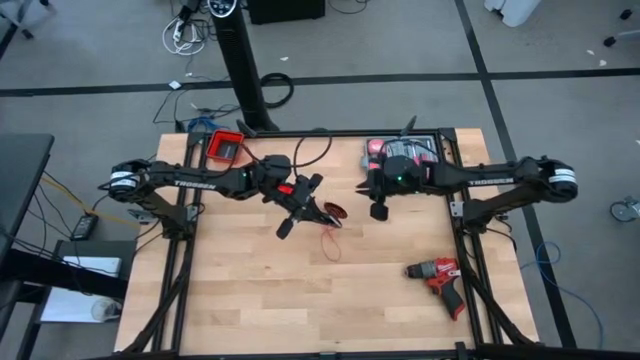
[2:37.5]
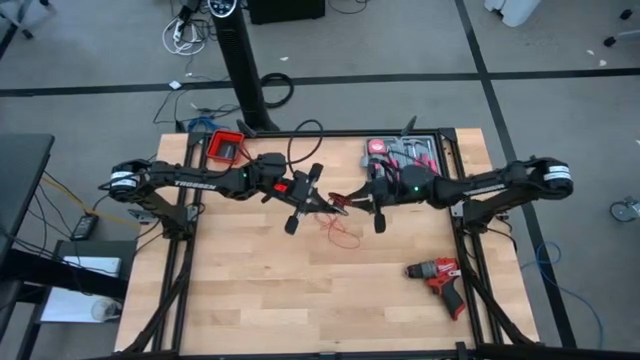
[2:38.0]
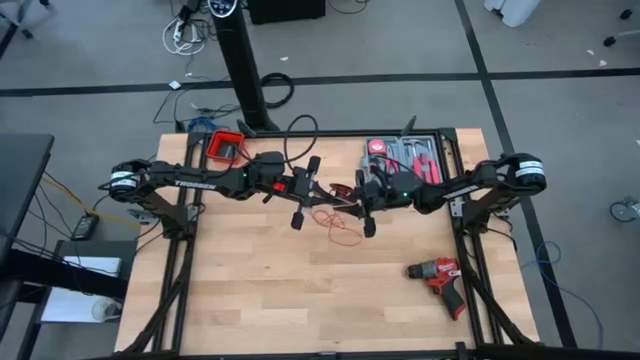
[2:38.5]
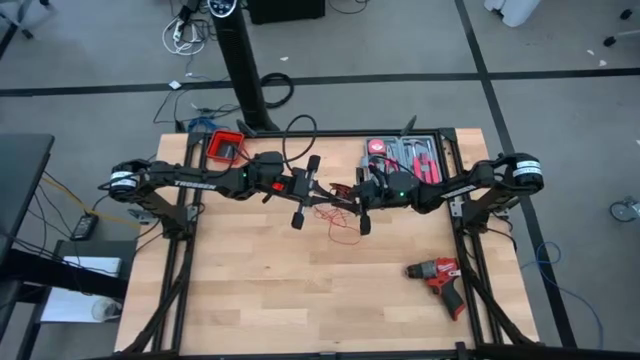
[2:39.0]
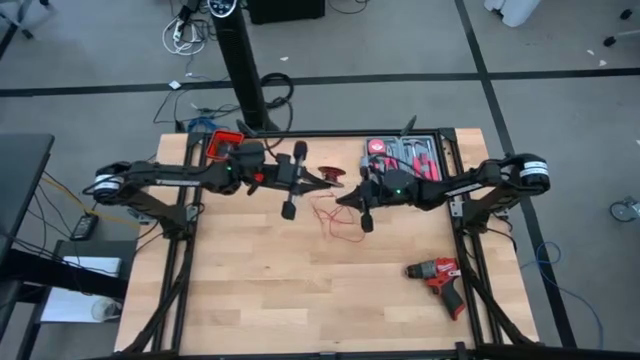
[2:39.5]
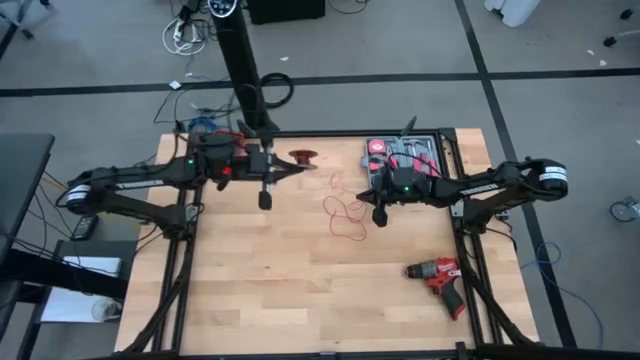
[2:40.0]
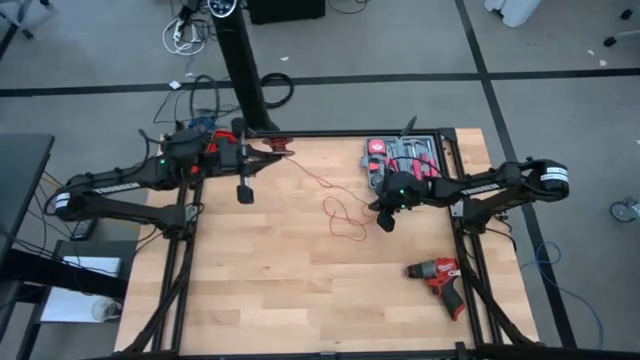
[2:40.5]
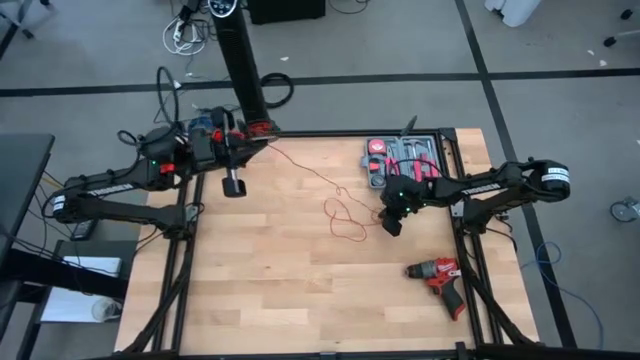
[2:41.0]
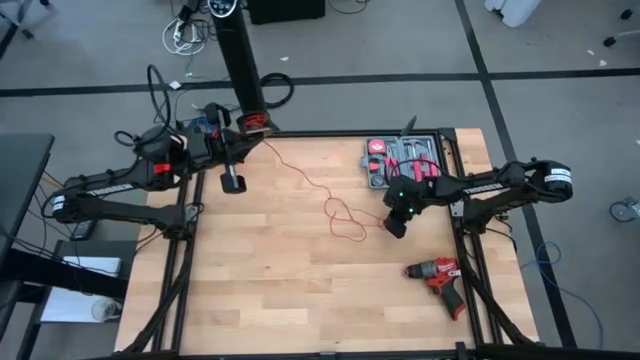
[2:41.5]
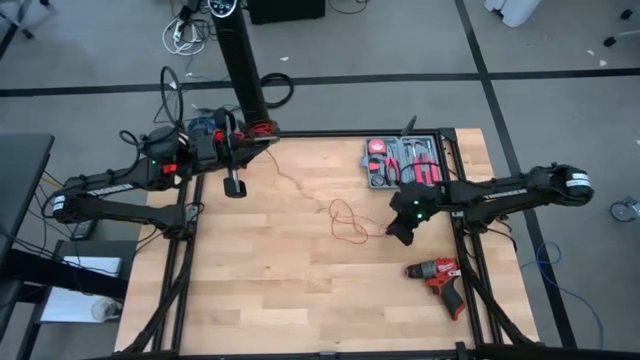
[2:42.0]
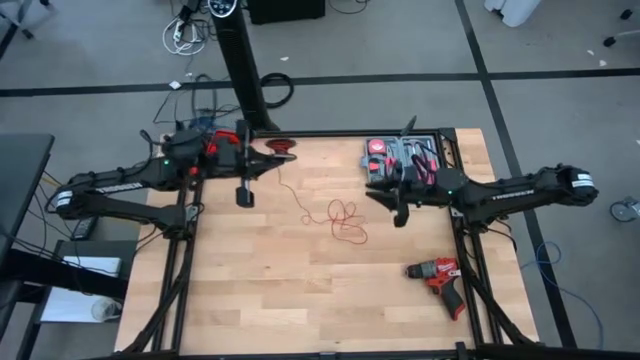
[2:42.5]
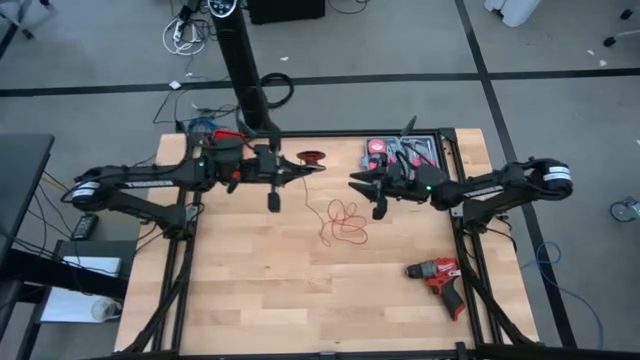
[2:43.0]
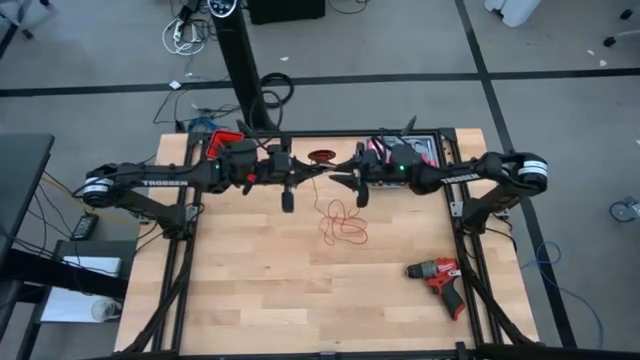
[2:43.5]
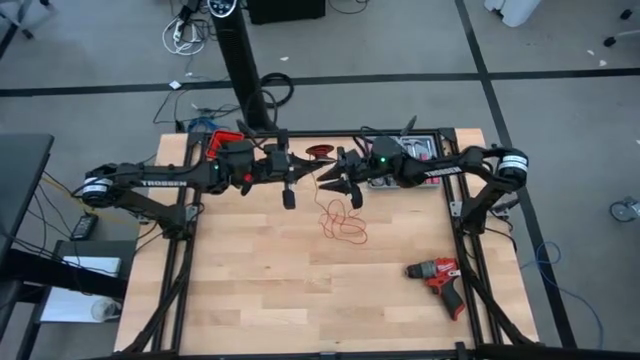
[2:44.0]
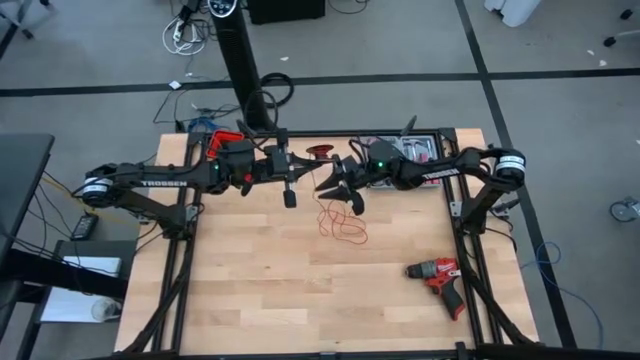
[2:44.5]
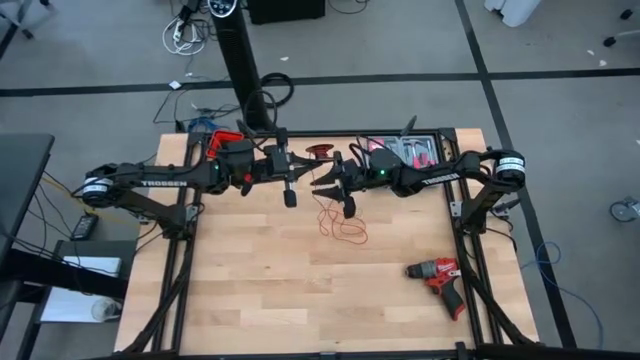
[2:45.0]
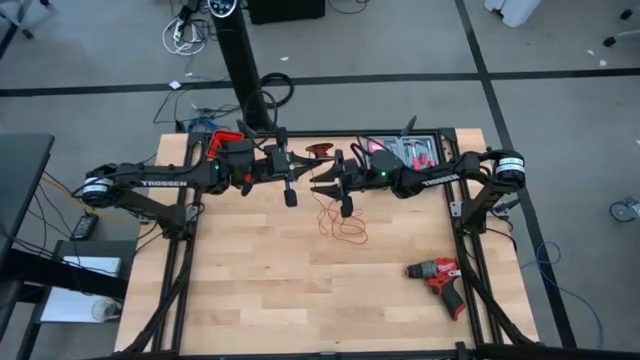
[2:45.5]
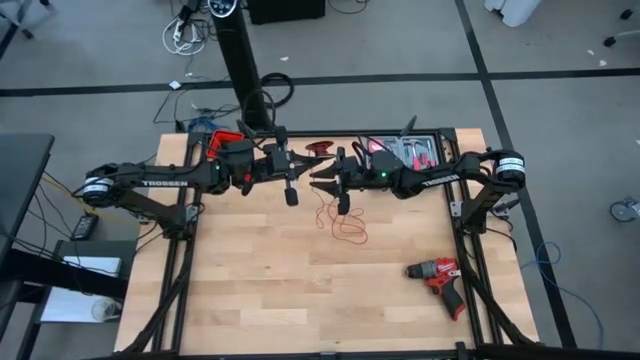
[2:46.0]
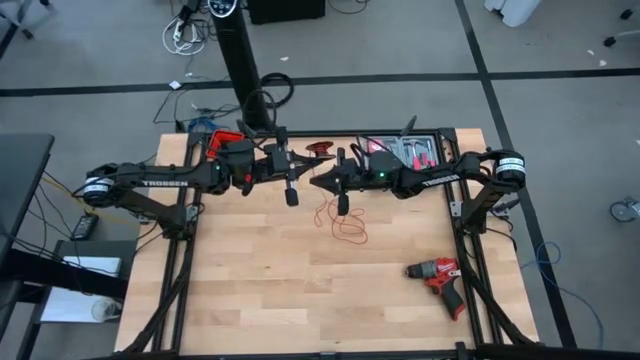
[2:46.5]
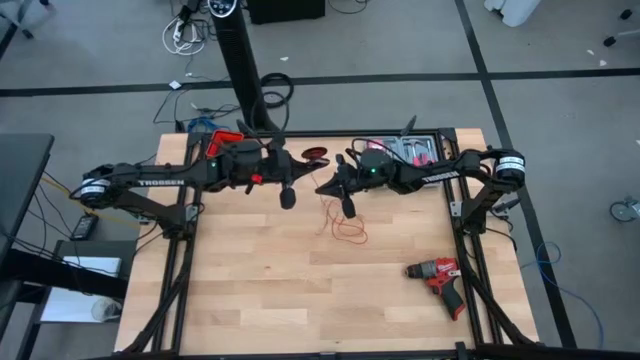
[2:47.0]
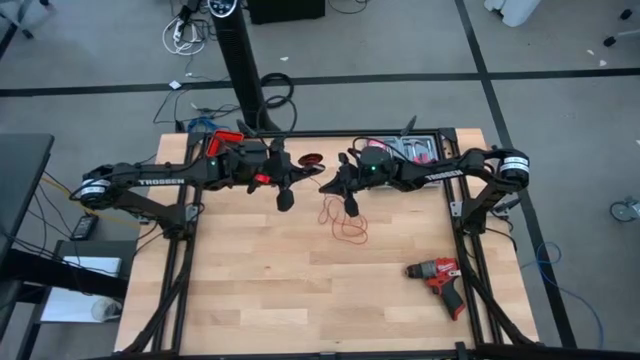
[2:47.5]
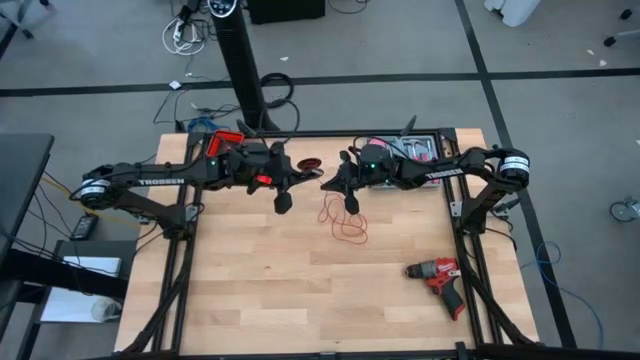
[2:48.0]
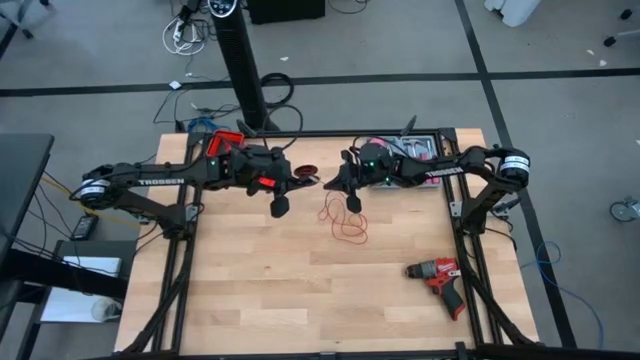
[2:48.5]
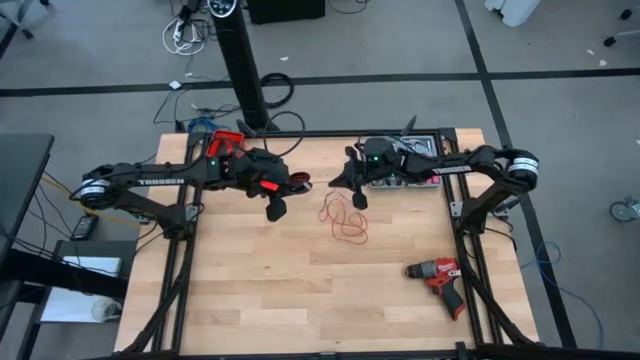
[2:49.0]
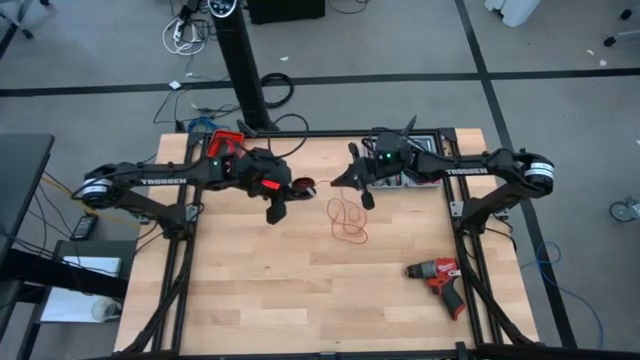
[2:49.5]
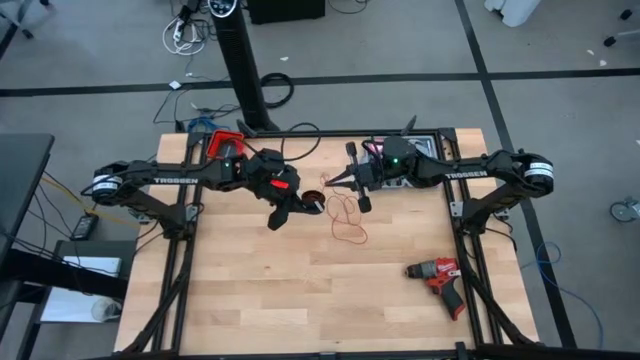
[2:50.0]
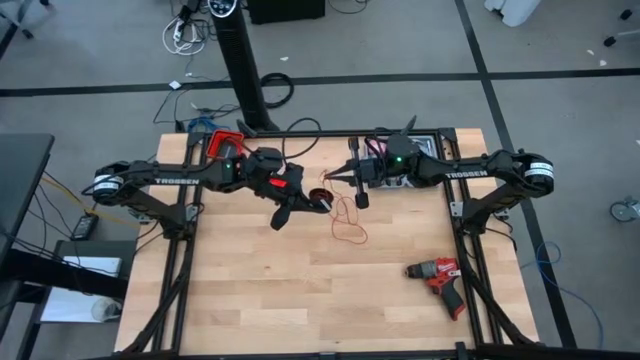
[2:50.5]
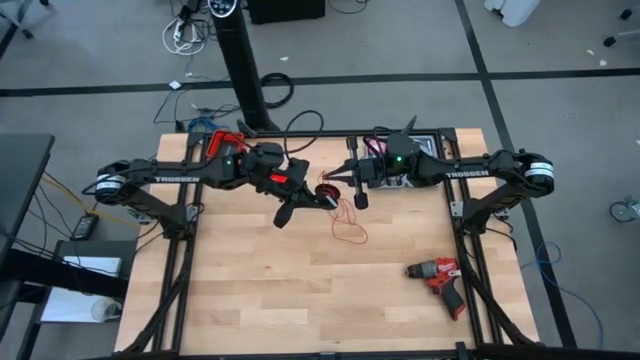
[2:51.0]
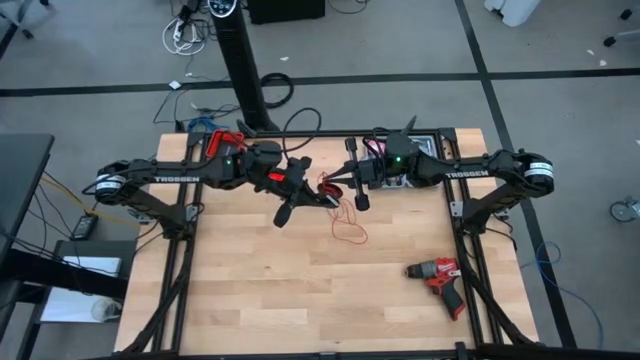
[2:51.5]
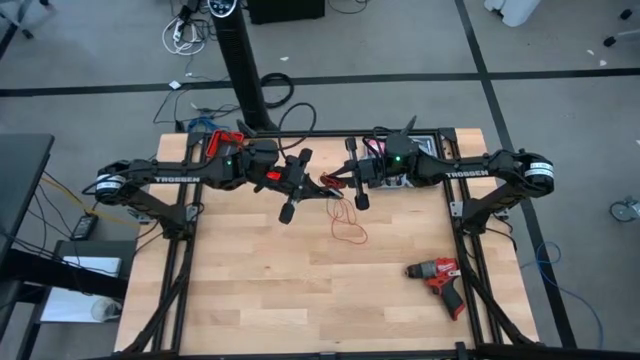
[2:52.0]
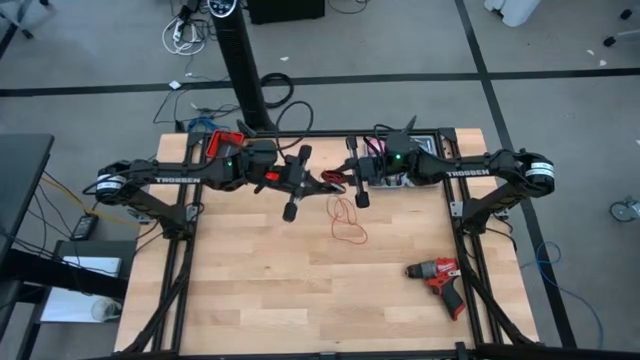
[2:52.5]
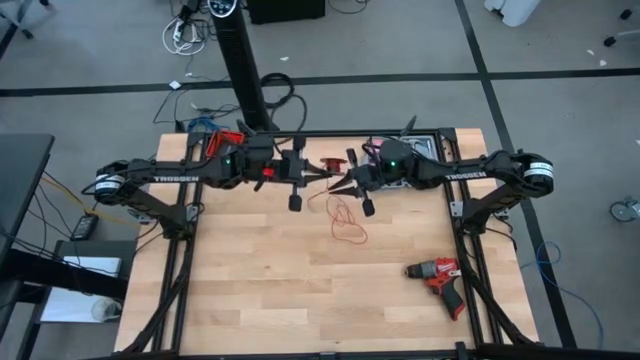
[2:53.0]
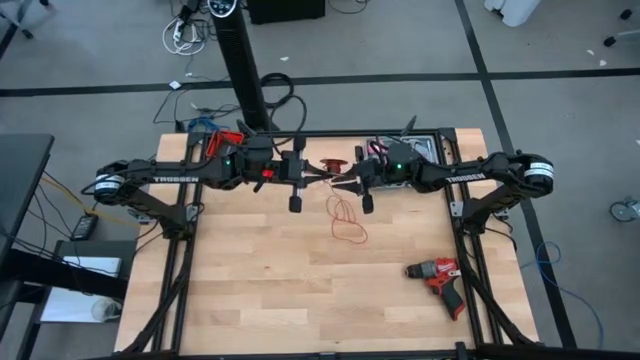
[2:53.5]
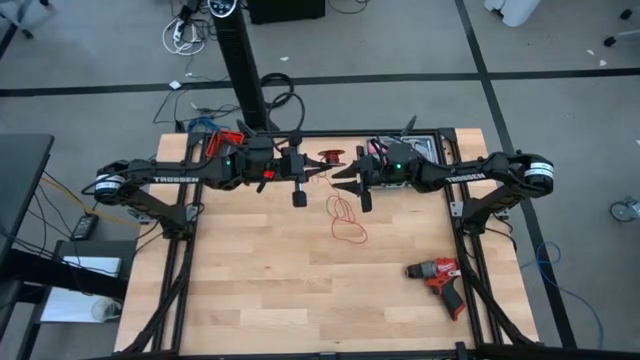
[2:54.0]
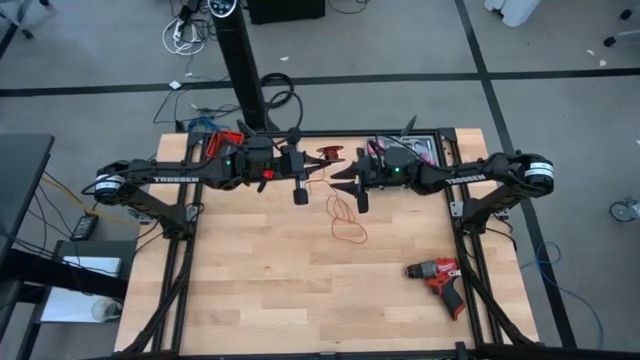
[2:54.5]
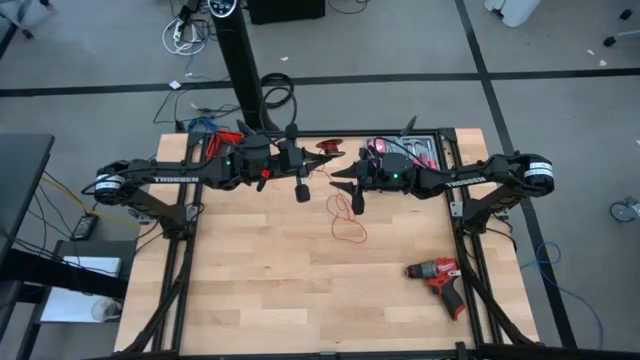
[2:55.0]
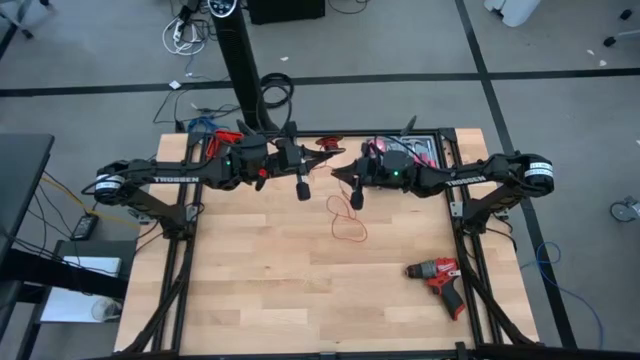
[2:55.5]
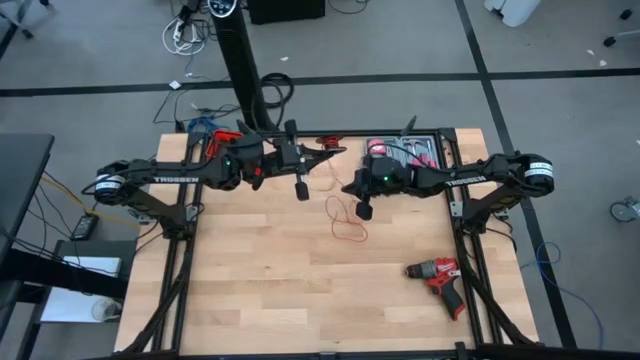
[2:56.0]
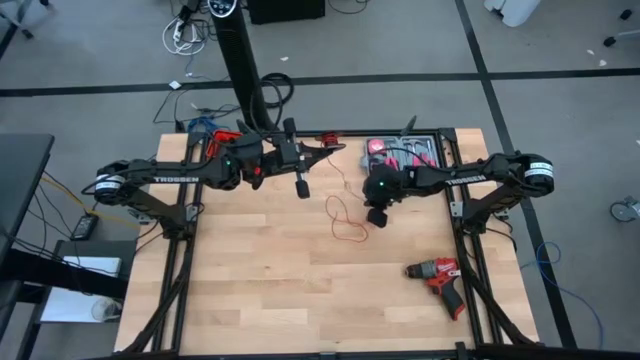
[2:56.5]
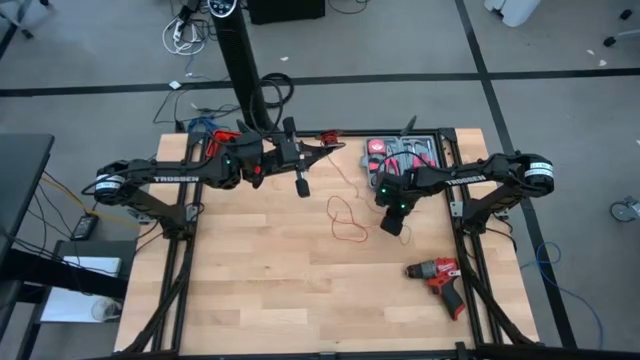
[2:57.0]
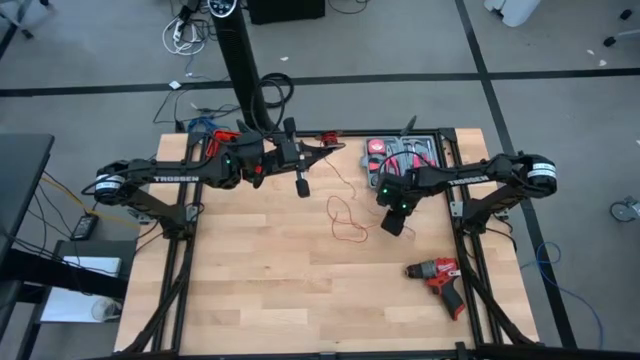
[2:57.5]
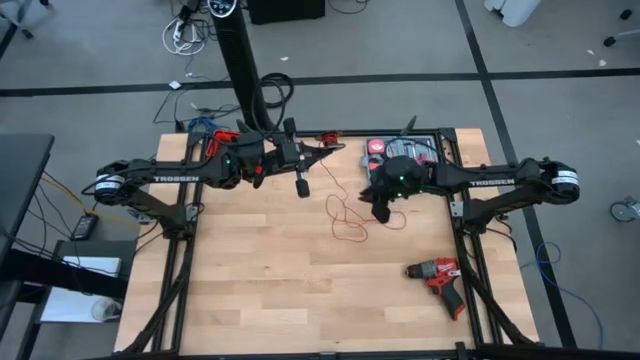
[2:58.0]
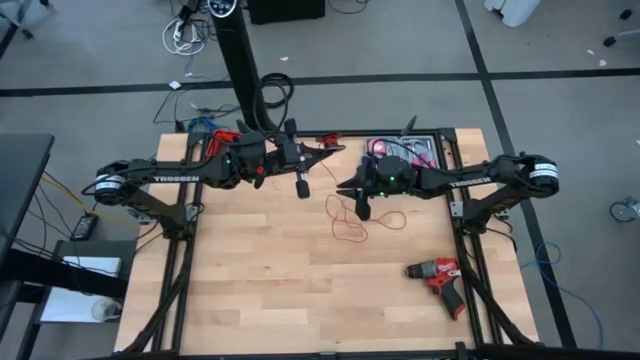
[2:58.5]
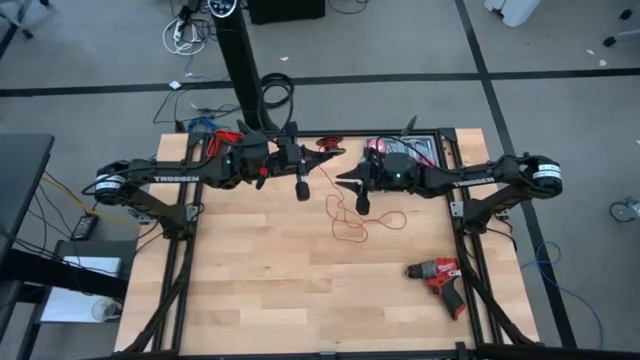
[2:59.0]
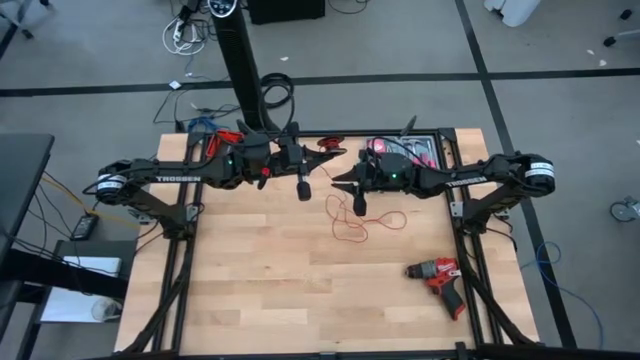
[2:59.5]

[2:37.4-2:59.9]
Task: Coil cords
Coil the red wire onto the black spool
